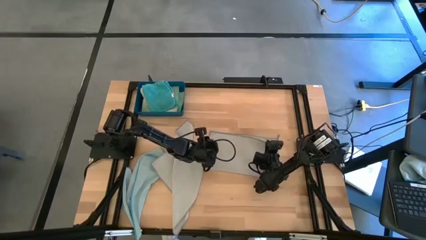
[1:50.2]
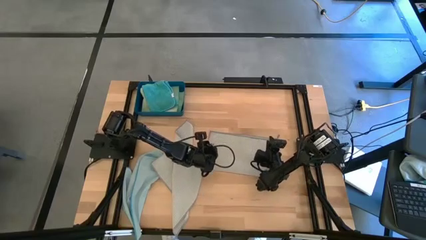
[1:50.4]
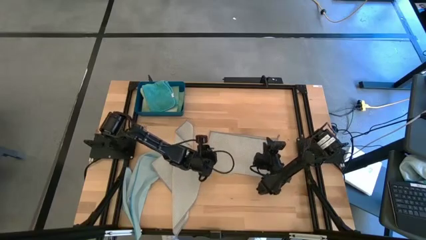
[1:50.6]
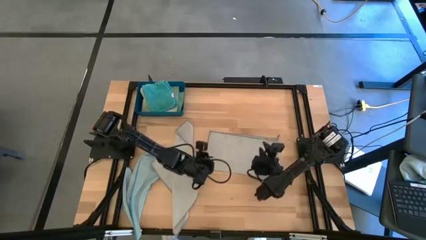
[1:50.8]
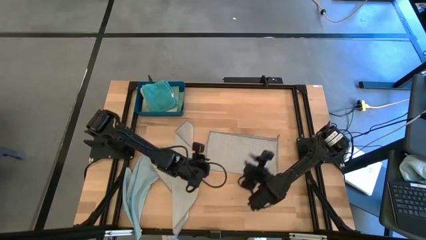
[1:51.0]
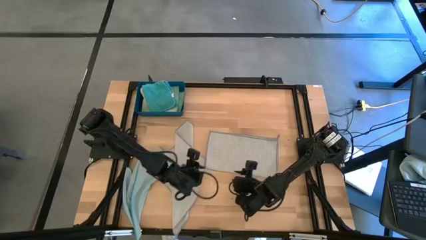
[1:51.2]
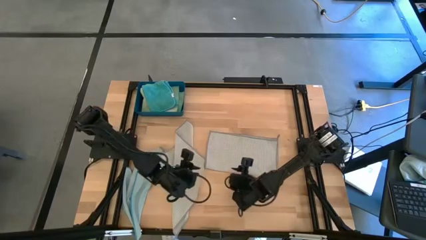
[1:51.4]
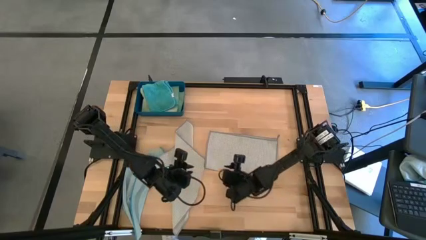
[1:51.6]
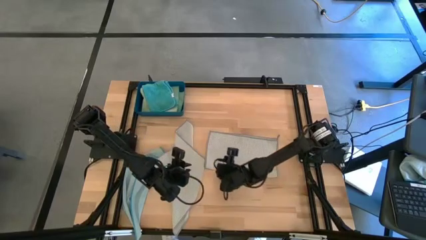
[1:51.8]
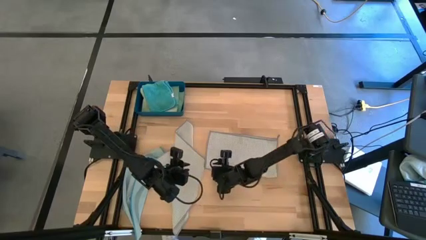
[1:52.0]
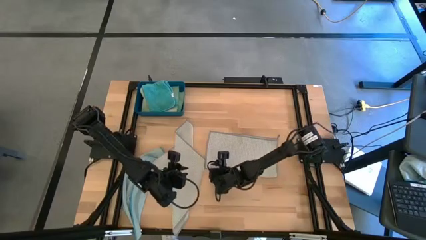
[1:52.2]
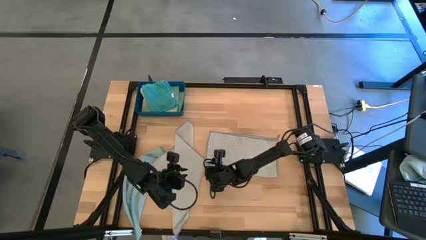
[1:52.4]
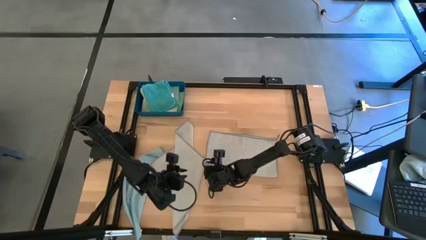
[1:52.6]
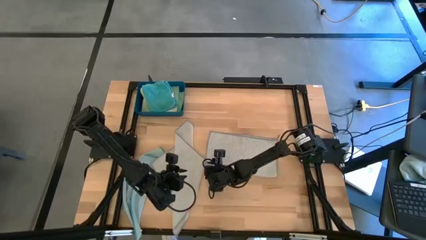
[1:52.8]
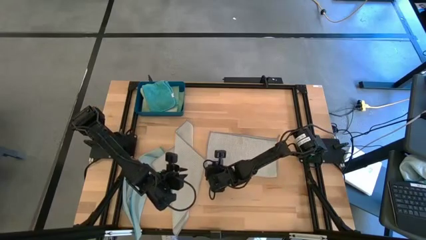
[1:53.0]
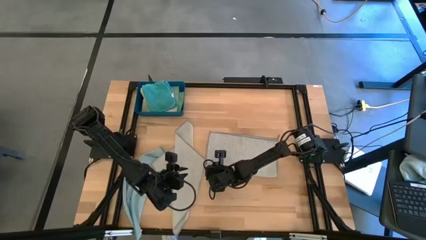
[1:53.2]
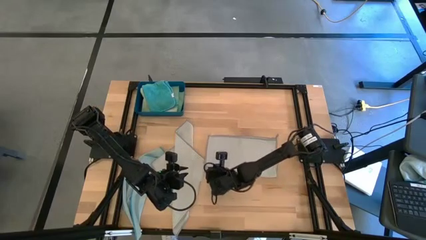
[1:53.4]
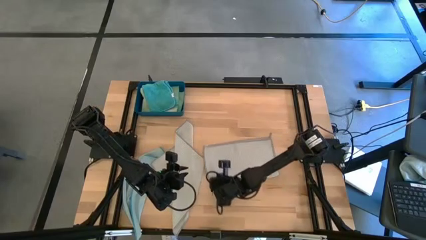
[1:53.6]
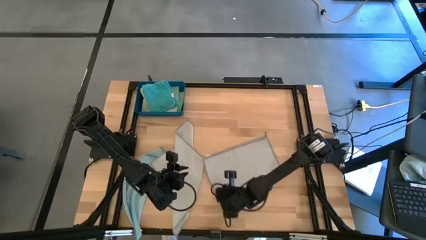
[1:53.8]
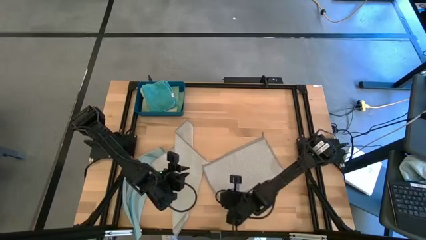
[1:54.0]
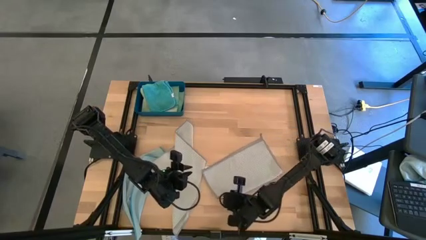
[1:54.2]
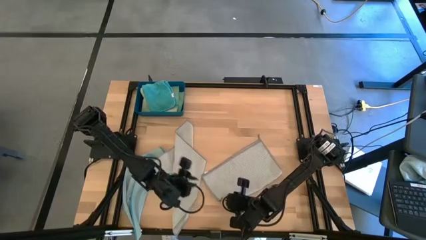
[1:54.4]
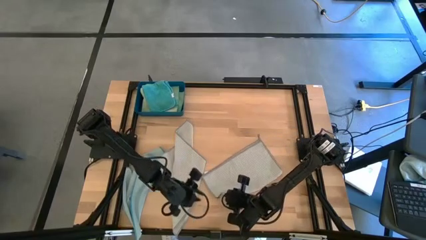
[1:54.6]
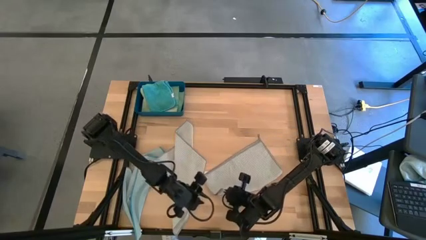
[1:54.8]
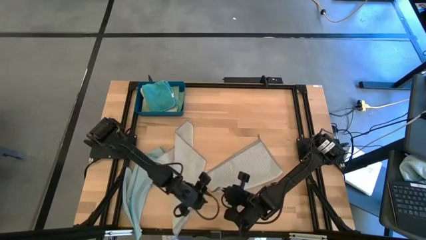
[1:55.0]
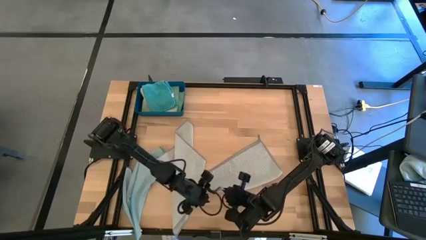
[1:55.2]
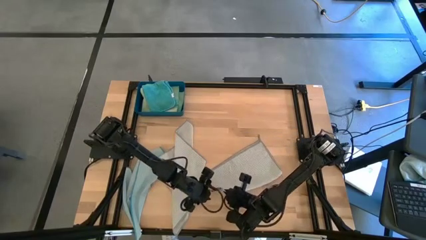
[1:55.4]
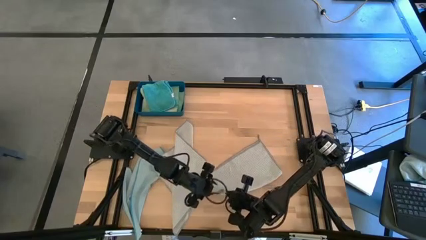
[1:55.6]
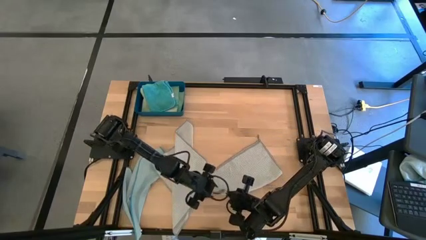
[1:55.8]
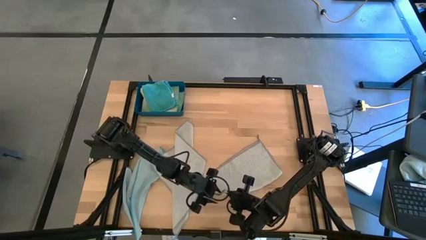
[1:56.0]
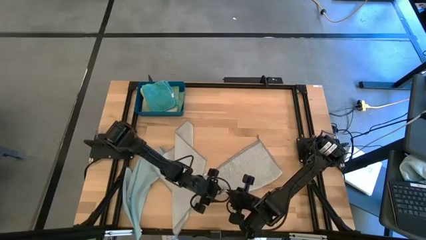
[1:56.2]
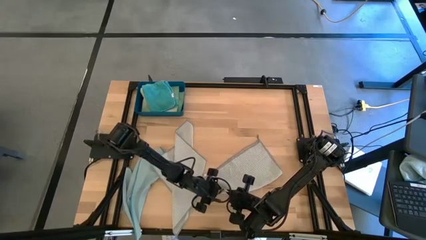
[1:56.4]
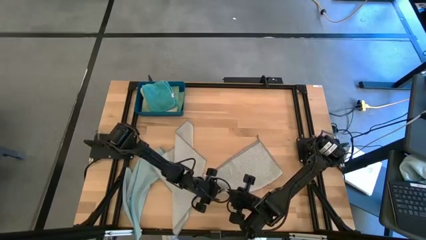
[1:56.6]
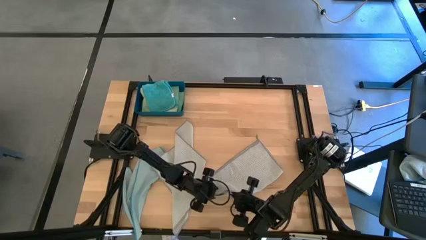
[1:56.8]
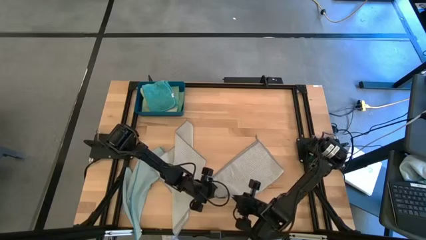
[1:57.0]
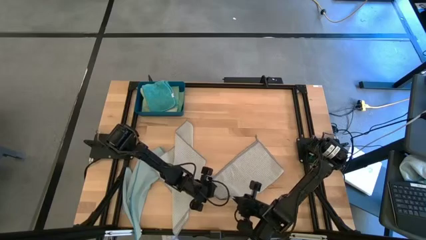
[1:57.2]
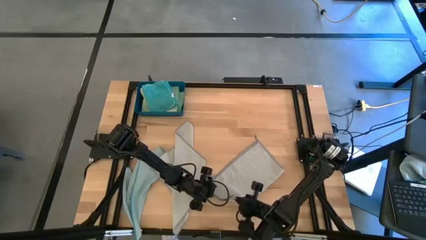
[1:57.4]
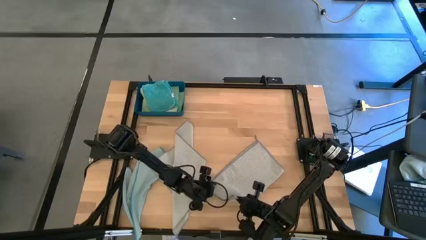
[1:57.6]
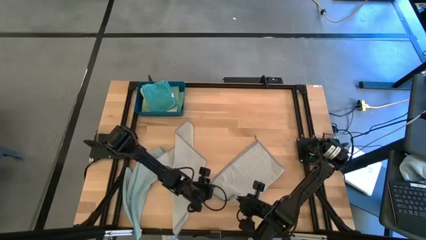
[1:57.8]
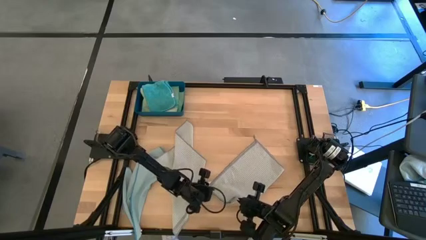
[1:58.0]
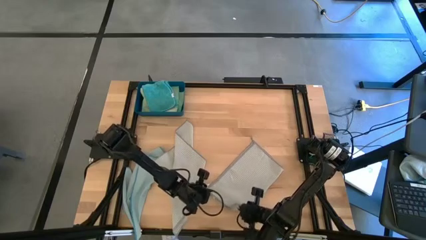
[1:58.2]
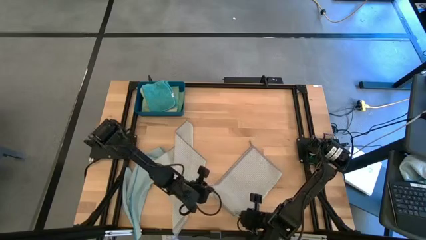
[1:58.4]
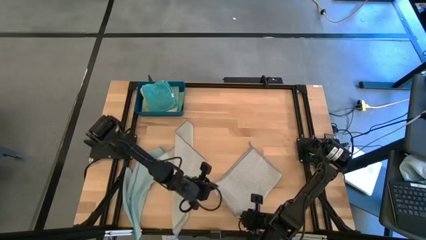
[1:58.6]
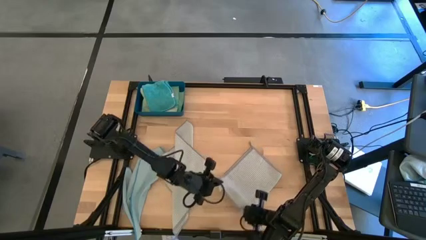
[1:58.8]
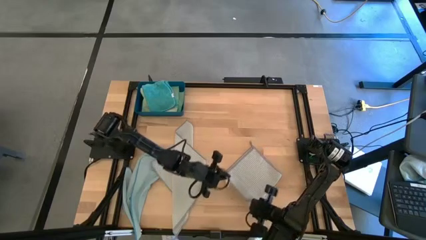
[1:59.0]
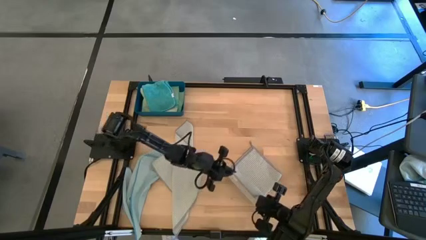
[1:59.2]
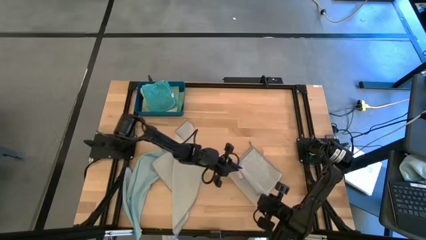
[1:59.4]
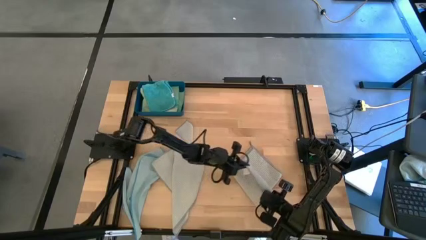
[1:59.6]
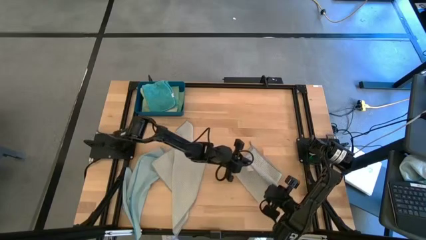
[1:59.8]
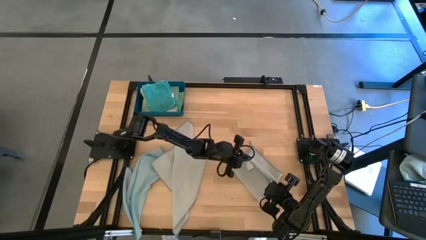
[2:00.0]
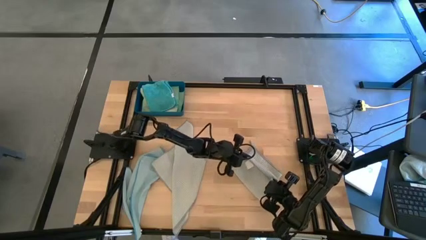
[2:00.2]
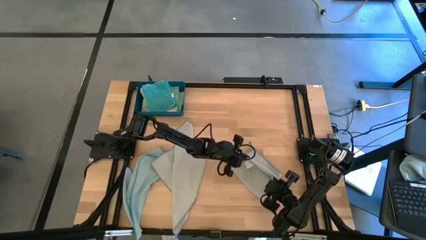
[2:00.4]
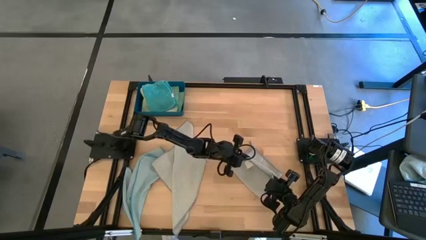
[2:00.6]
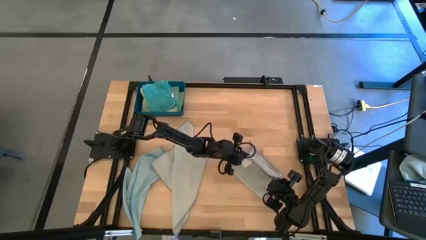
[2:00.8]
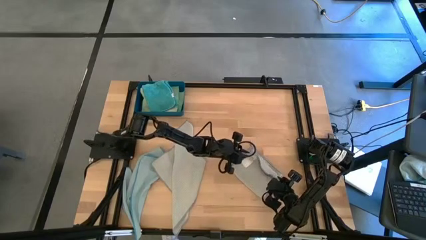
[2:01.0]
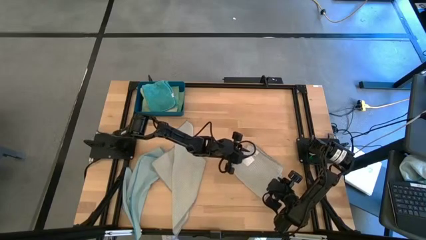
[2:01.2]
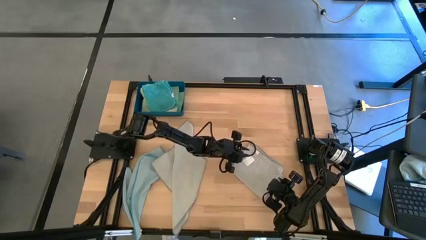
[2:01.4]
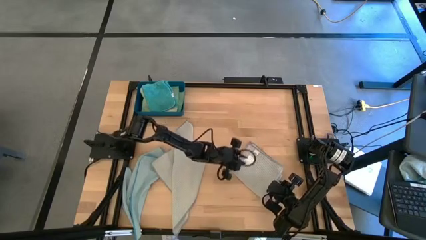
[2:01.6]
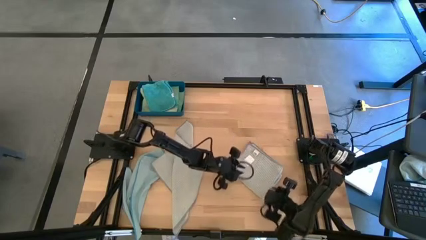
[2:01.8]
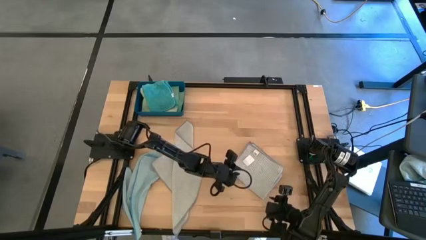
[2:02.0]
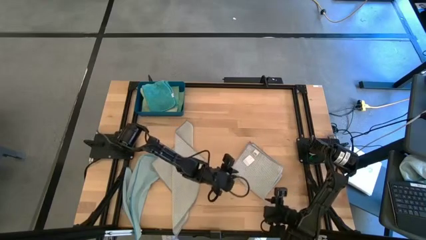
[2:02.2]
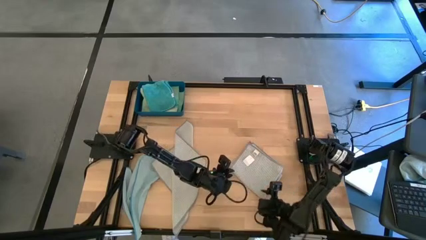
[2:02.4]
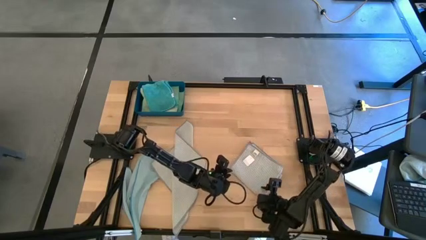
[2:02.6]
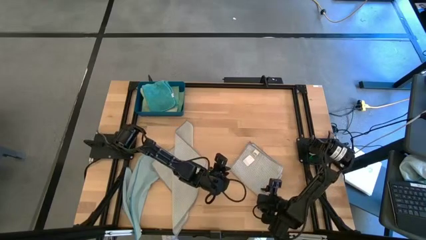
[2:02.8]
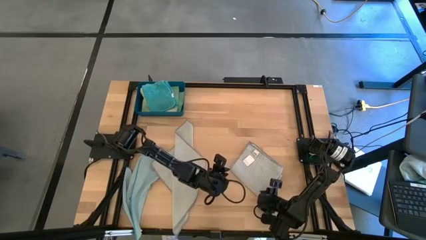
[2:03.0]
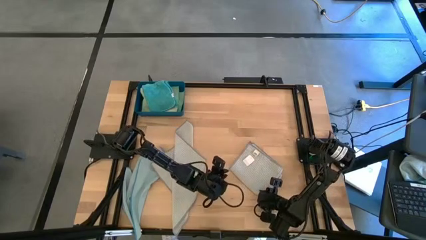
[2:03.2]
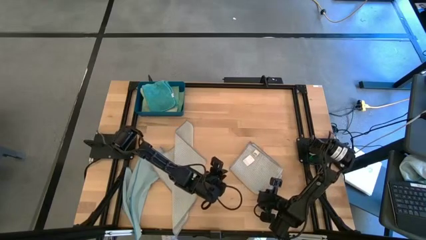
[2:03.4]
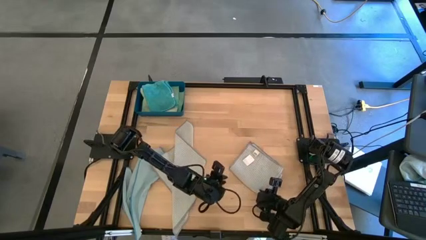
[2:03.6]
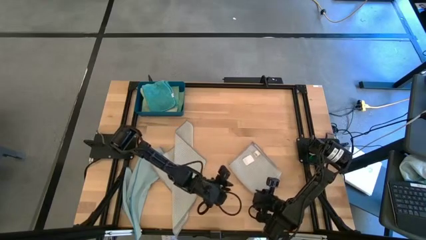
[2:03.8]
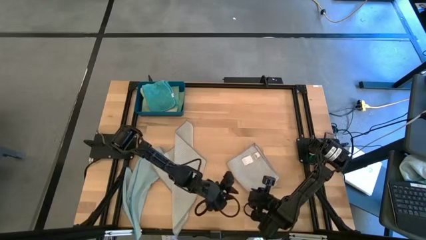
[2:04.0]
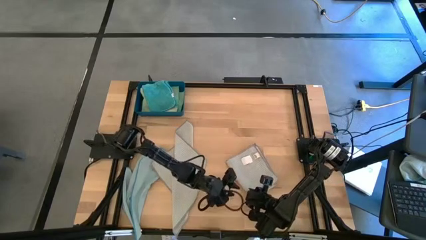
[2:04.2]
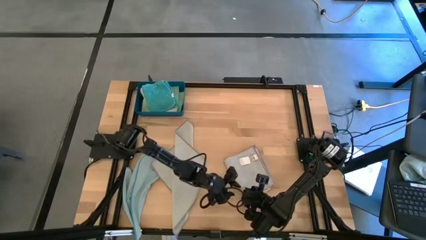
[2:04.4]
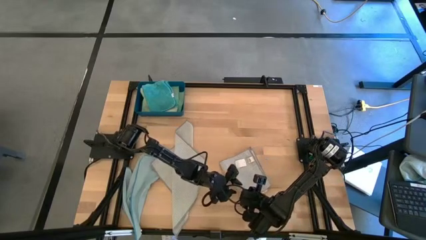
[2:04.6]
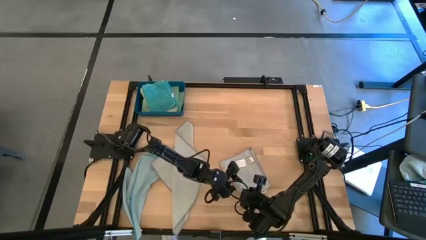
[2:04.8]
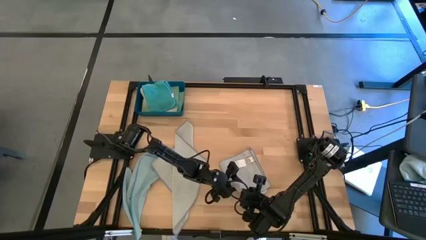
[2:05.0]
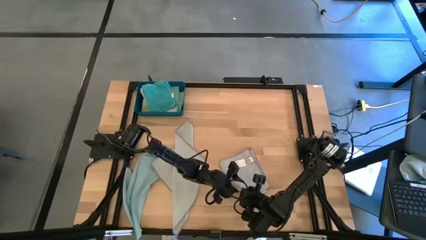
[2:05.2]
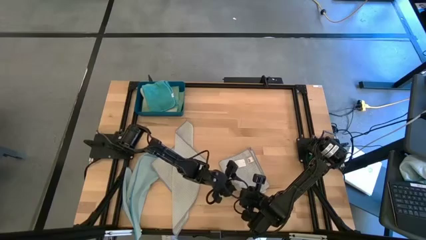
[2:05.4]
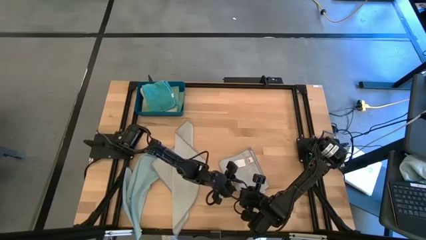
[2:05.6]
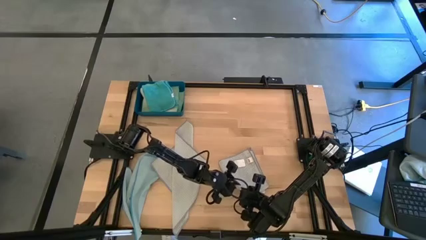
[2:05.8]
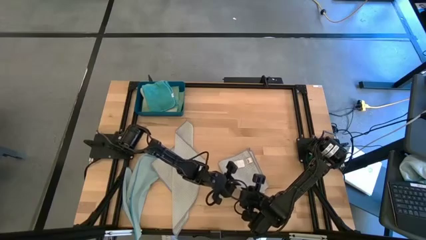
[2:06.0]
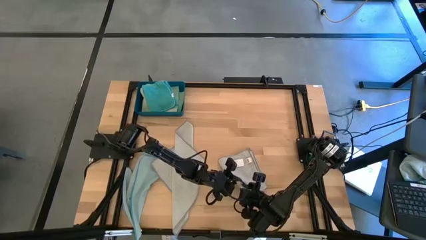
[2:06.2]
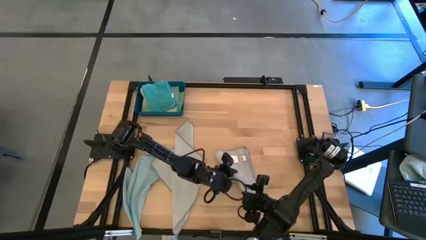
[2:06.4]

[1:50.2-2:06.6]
Task: Fold microfiber towels
Fold the right gray towel
